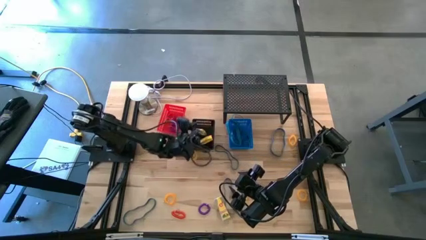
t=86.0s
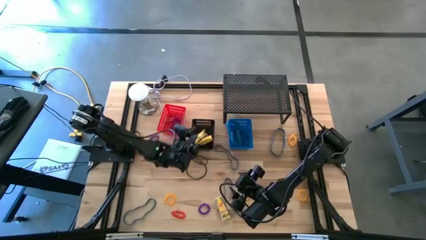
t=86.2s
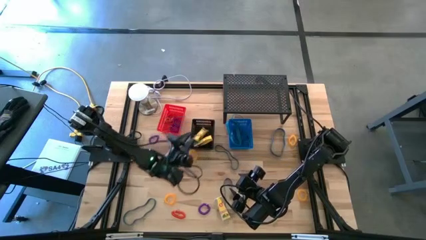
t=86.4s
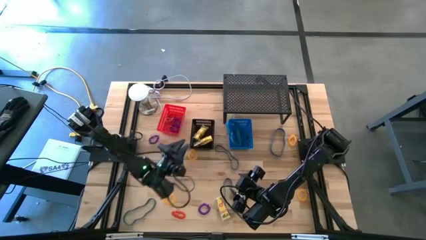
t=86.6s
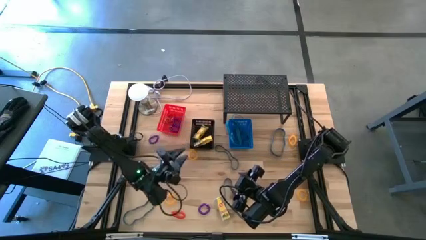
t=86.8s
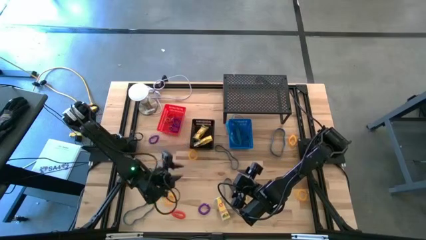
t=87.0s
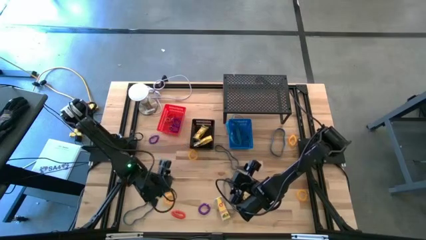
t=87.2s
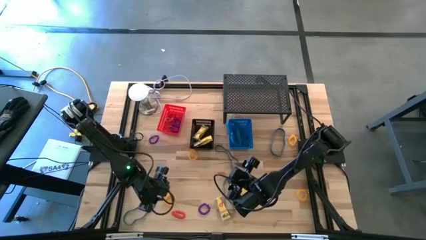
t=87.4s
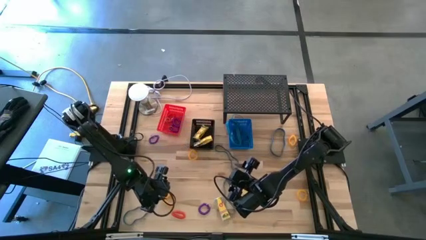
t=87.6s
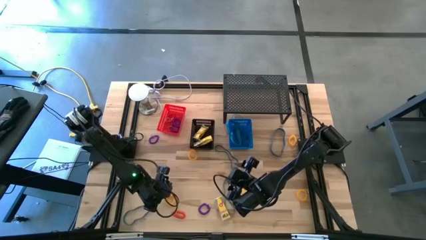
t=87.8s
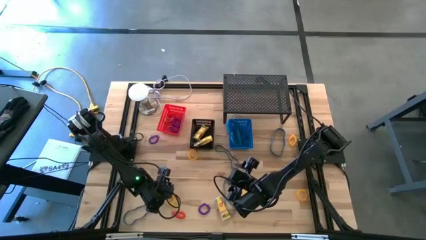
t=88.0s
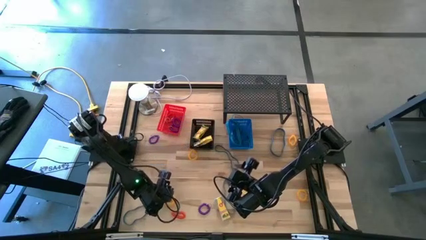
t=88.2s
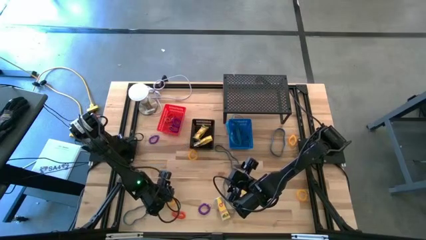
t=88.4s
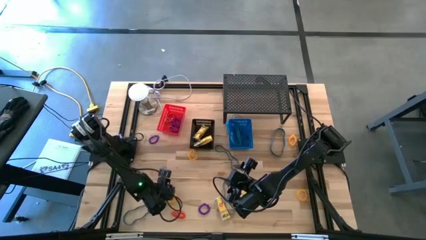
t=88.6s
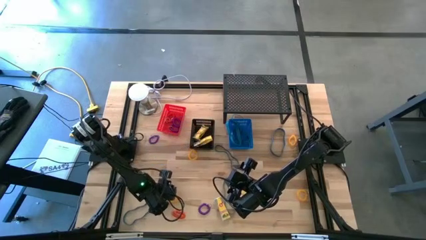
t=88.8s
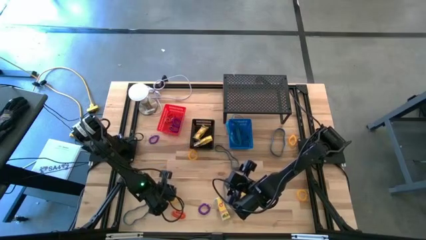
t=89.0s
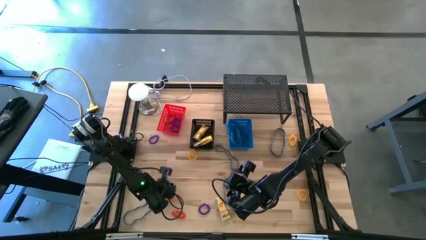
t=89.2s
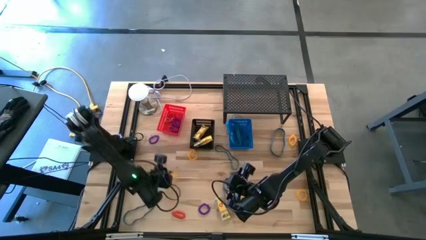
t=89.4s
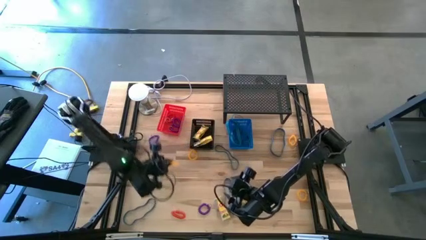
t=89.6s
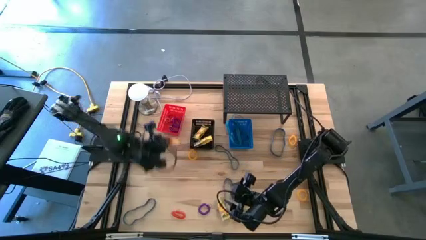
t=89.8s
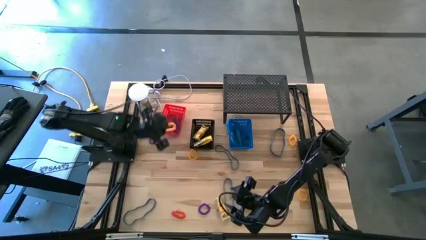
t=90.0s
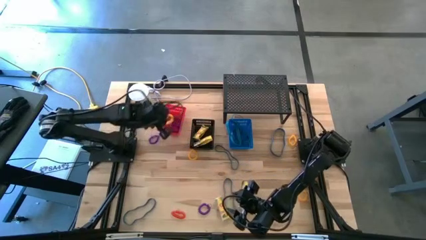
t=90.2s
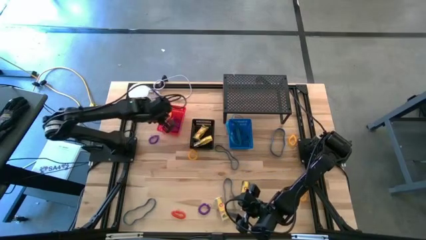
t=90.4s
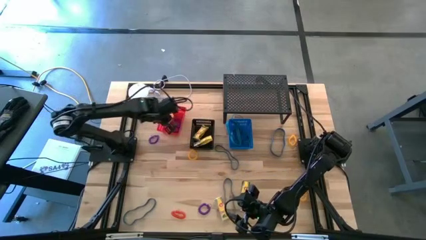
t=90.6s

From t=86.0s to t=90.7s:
Task: Pick & Place Office Desk Supplies
Put the bottom left yellow wrist coil keychain into the orange bin

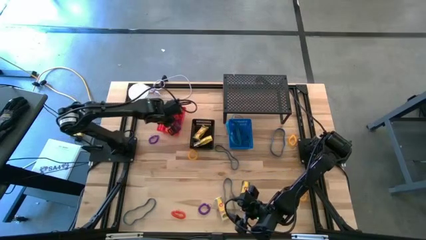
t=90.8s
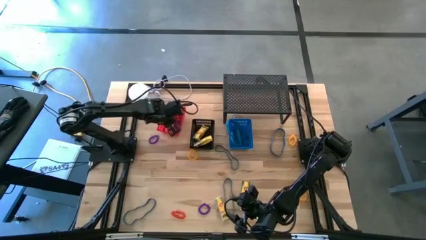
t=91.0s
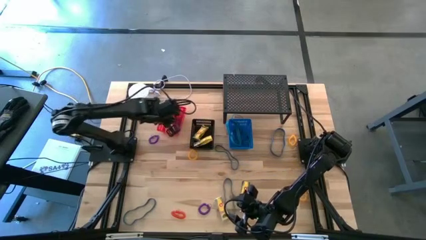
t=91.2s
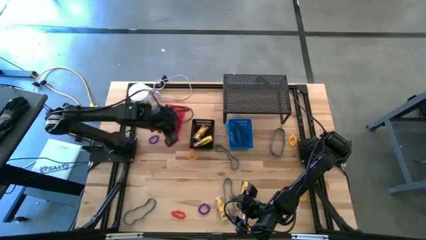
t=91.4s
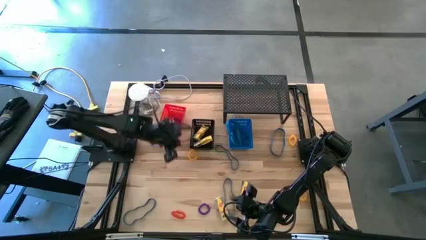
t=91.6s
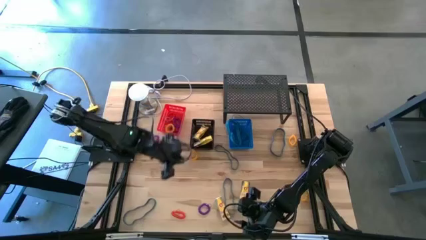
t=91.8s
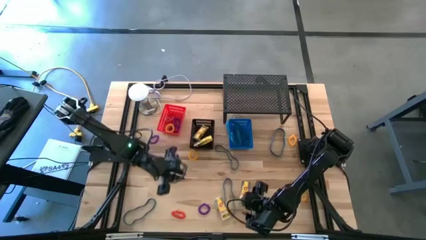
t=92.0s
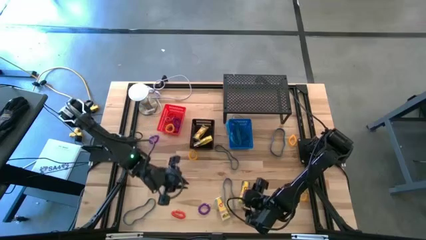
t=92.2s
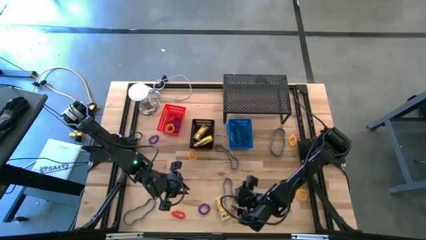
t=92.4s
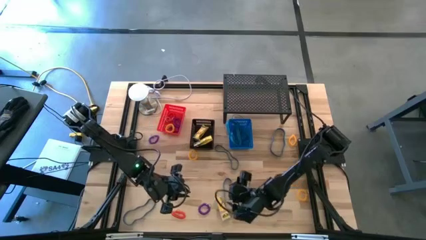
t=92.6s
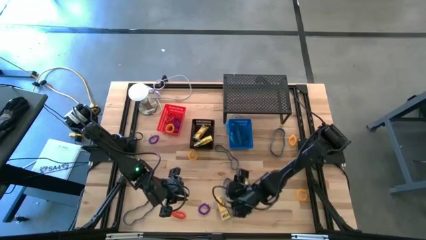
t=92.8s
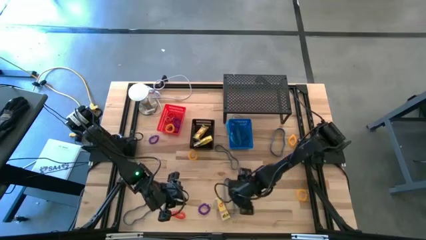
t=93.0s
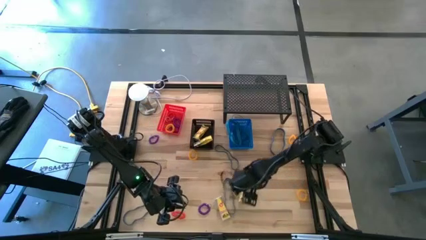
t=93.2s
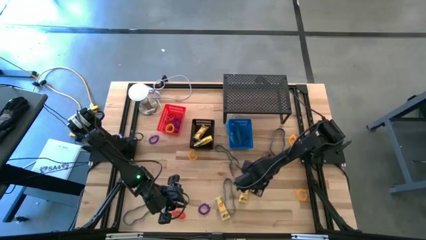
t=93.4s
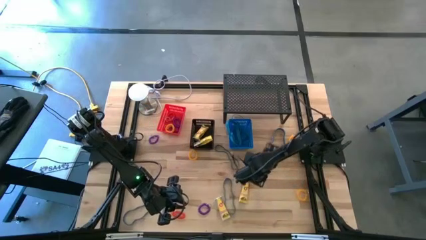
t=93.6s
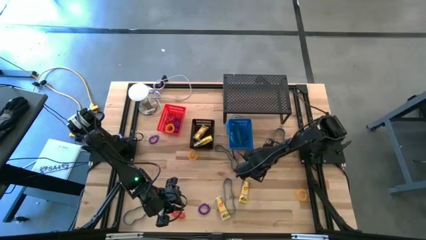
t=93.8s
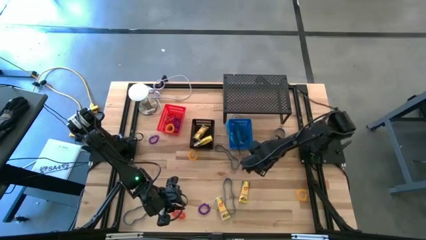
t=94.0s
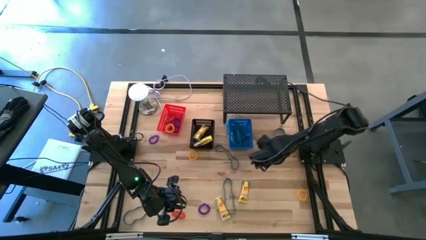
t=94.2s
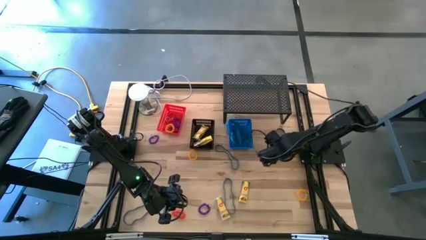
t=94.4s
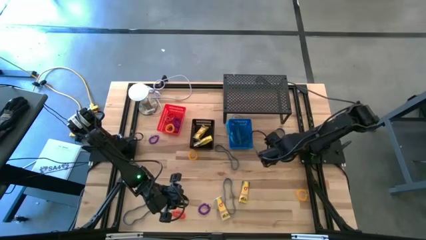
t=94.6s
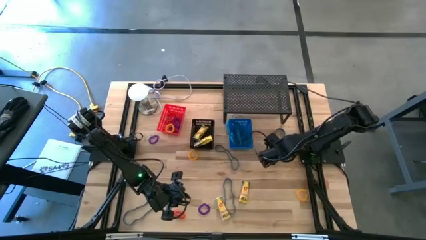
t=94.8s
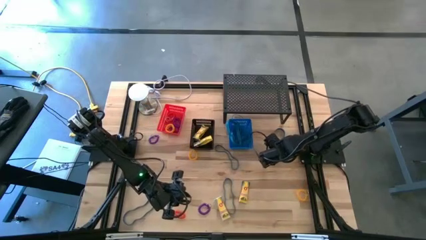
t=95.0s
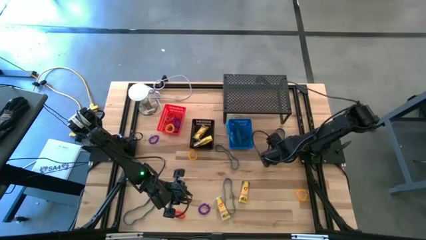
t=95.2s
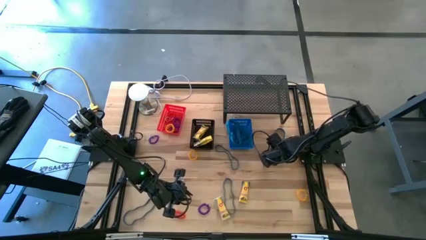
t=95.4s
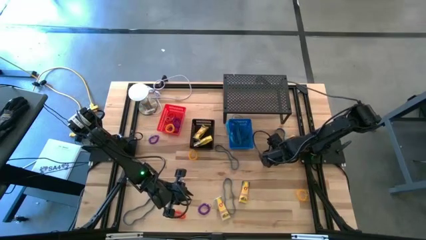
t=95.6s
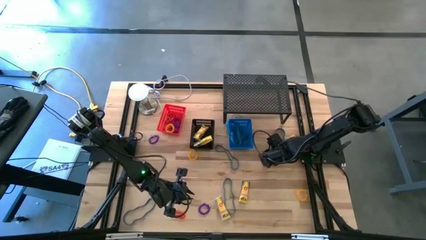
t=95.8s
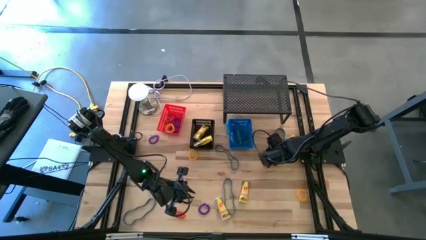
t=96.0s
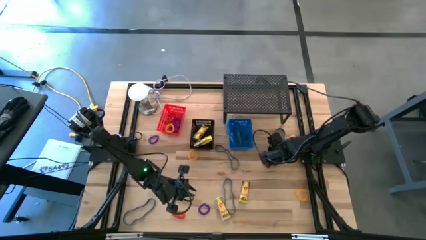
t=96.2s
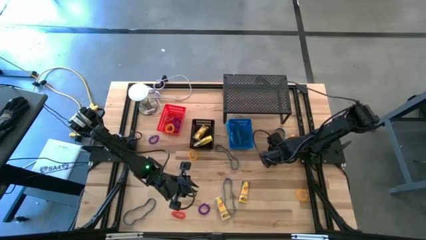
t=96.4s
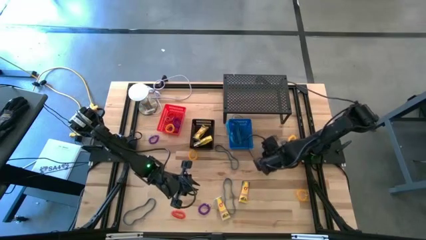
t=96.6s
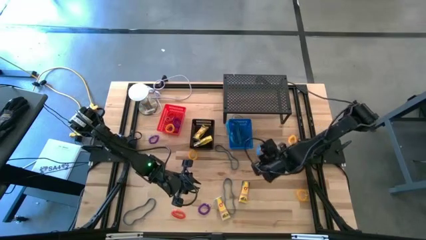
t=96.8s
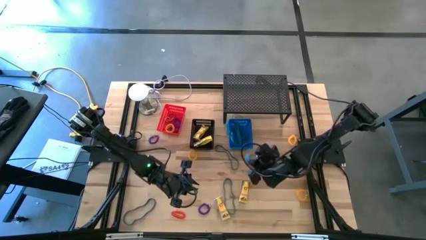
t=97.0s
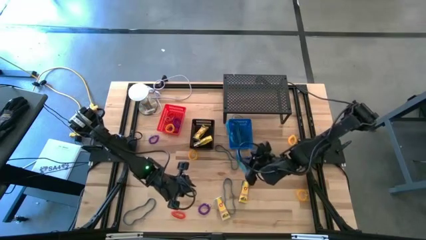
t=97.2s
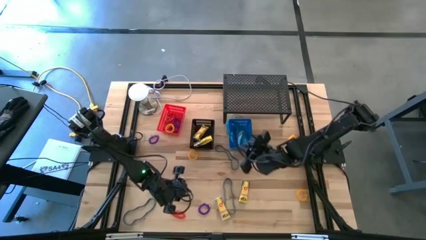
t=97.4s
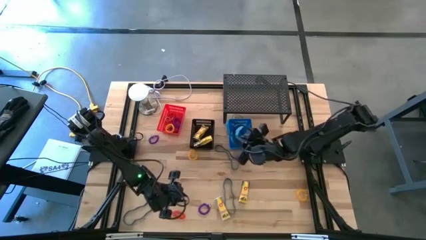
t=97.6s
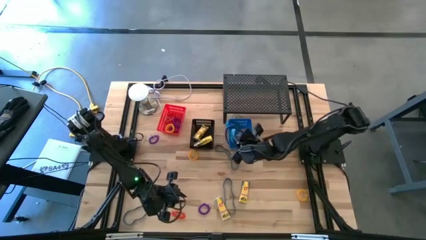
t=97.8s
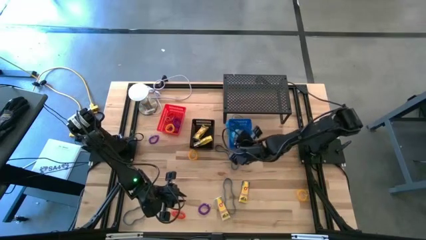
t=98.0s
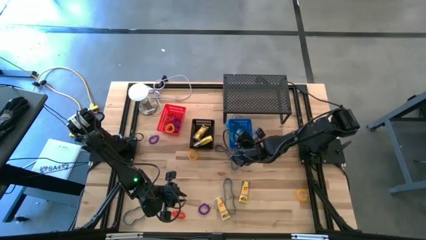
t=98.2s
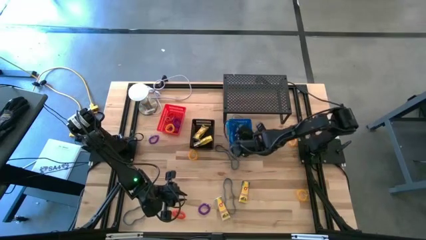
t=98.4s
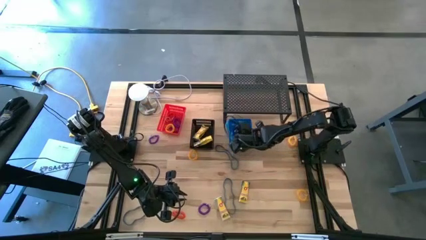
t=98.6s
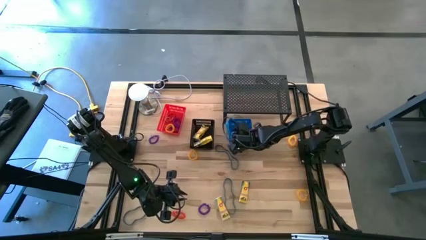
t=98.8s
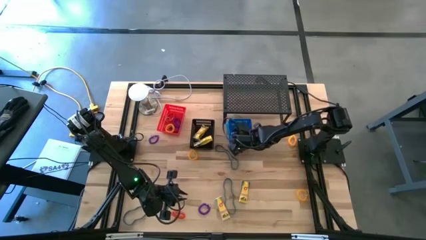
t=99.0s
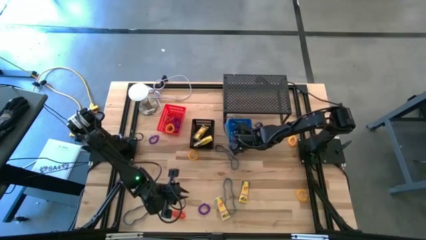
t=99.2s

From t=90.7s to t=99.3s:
Put the blue rubber band into the blue bin

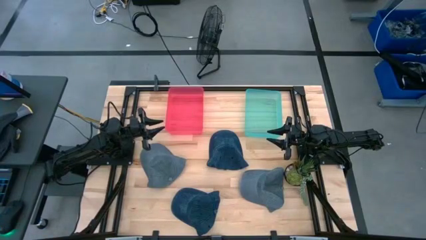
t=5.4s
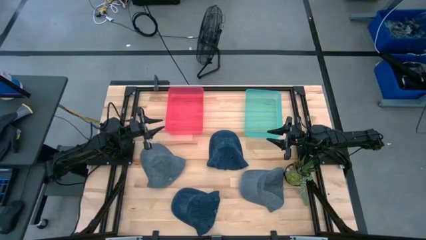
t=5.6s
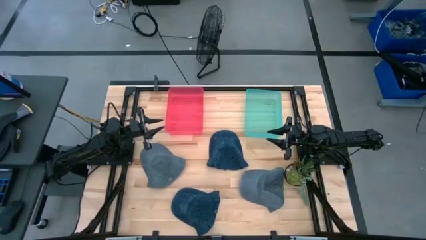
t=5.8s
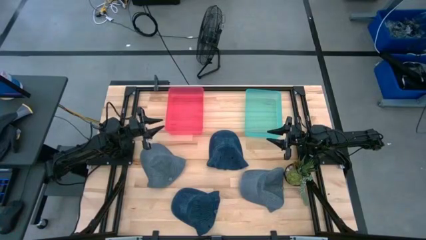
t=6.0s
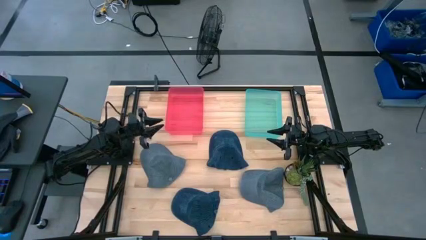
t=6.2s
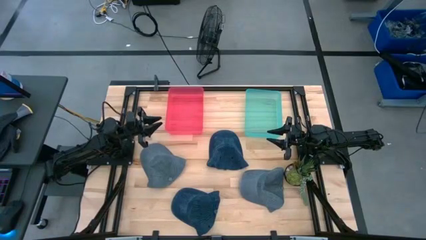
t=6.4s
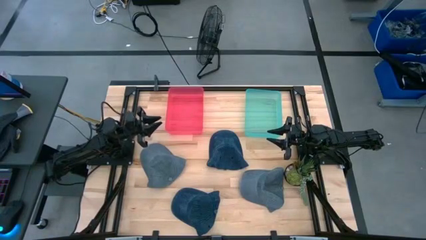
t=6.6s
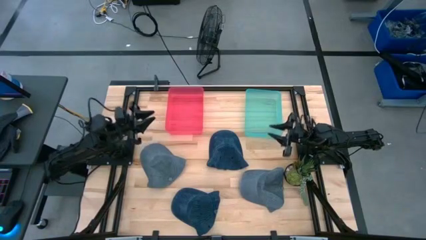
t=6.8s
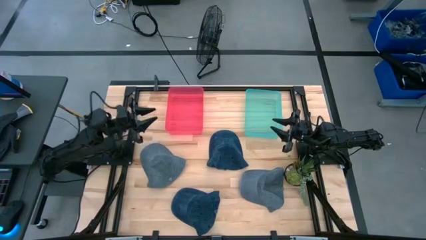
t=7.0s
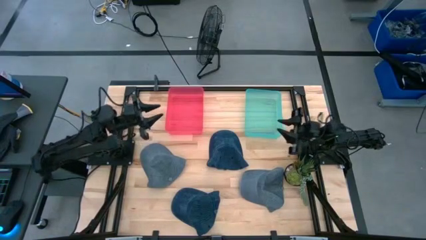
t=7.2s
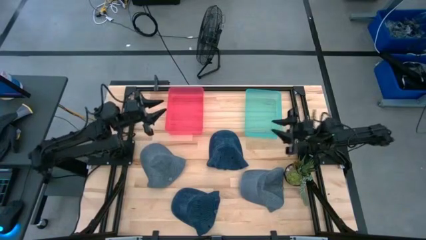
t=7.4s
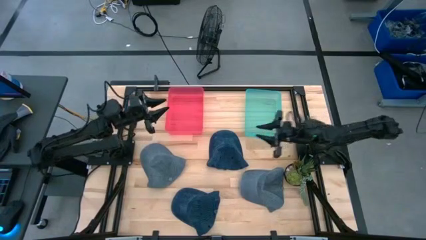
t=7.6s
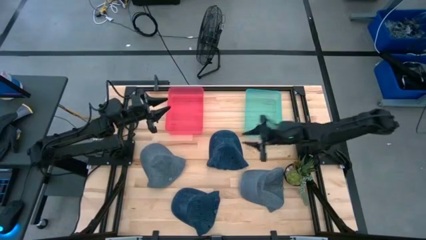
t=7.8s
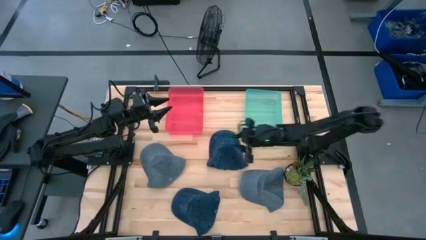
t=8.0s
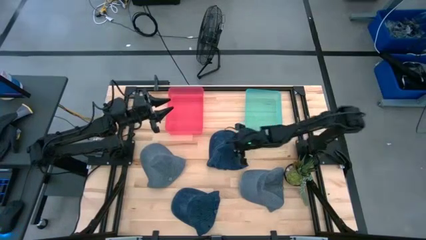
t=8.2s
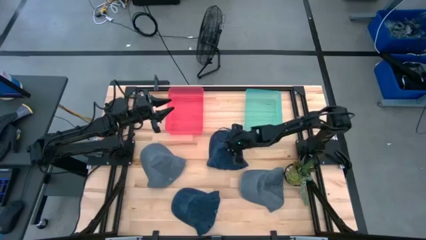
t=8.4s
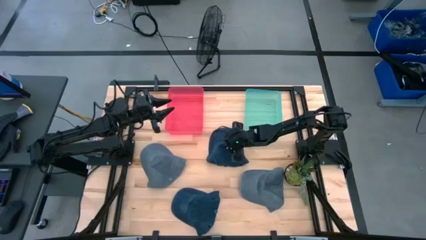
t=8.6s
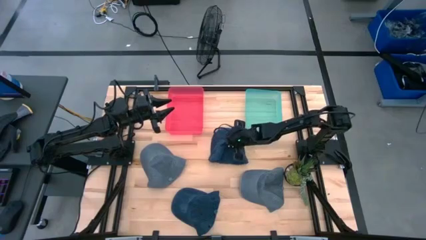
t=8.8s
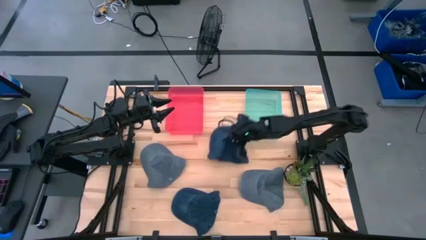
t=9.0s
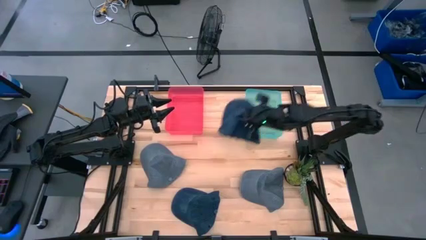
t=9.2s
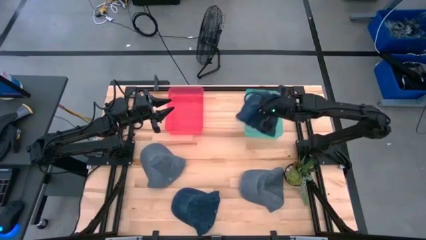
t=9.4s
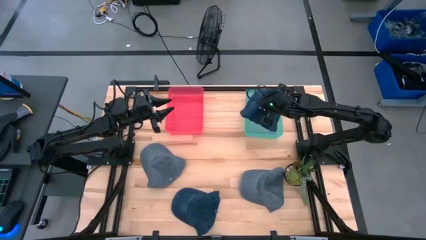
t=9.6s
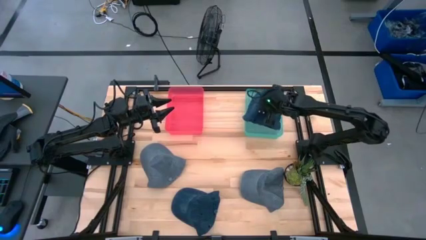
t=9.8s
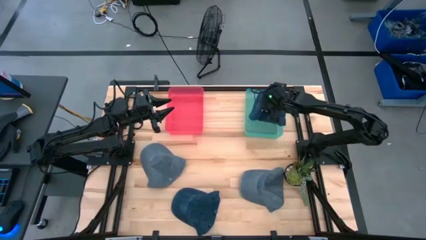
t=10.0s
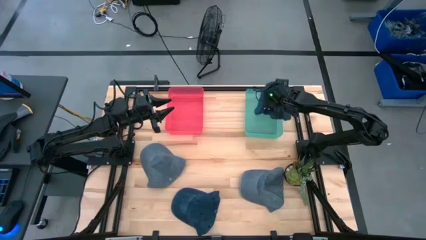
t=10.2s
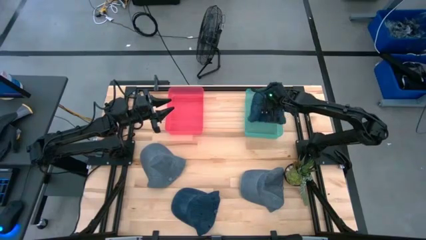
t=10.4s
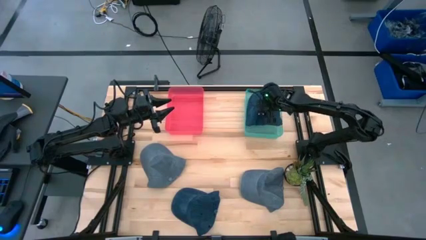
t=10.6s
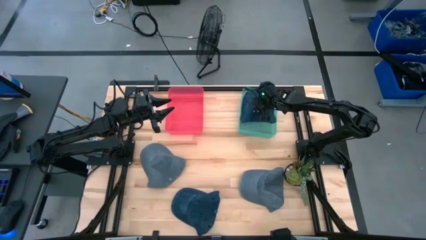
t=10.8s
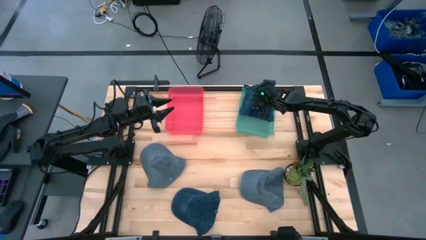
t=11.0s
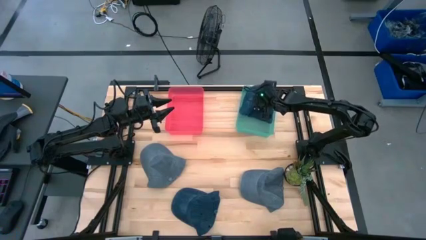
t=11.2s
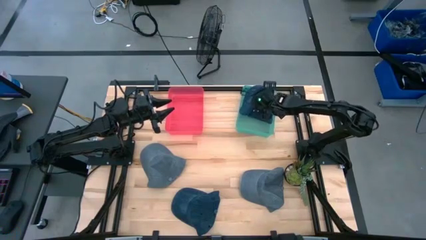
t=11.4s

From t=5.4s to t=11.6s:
Task: Pick & Place hat
Put the top blue cap into the green bin
